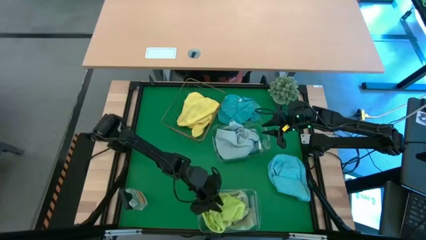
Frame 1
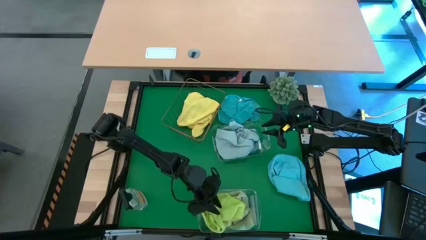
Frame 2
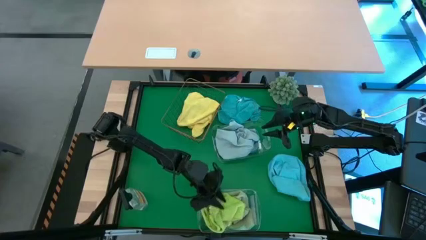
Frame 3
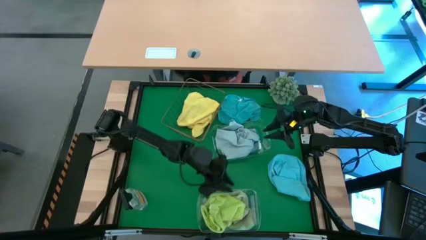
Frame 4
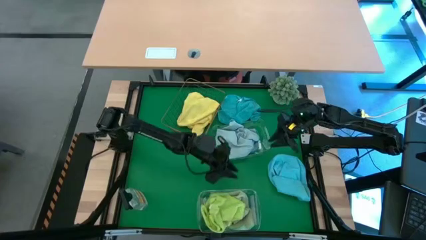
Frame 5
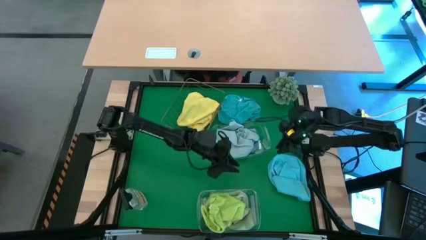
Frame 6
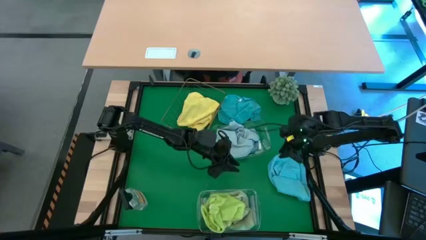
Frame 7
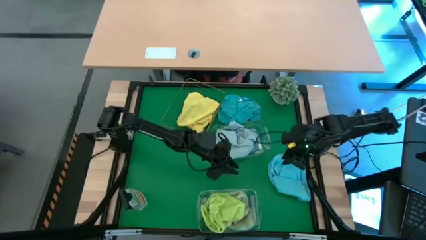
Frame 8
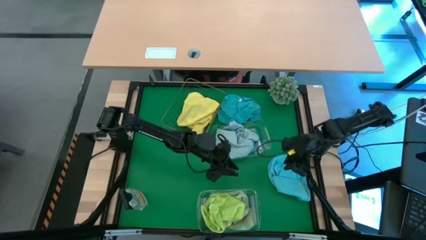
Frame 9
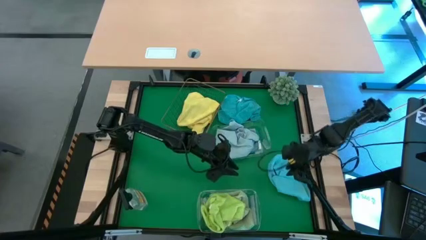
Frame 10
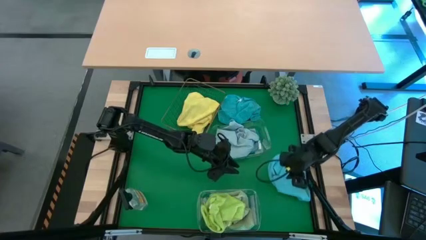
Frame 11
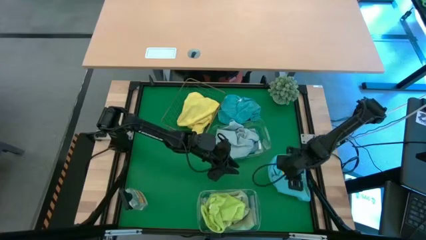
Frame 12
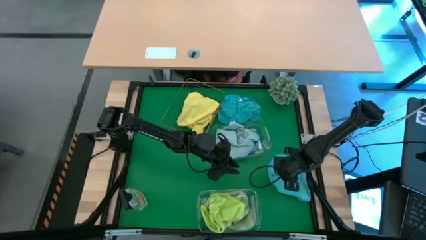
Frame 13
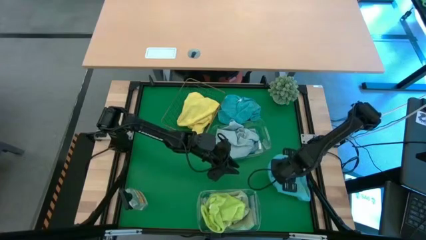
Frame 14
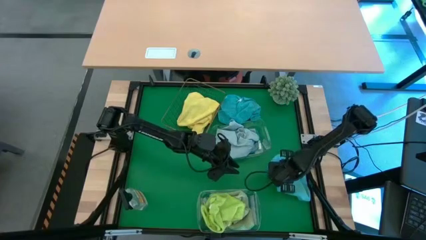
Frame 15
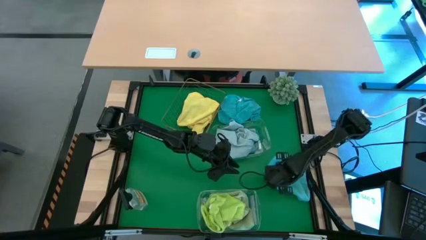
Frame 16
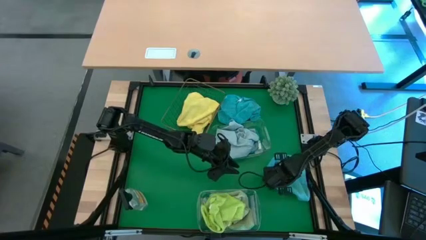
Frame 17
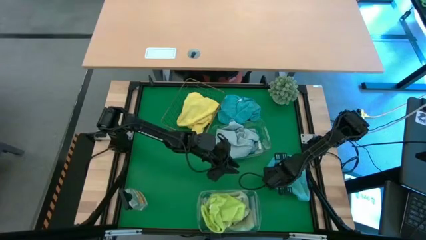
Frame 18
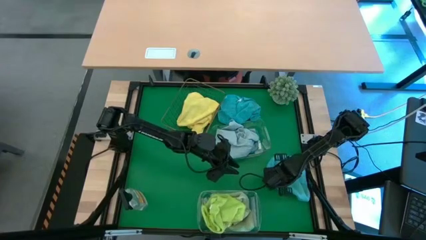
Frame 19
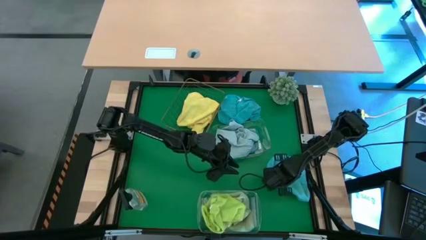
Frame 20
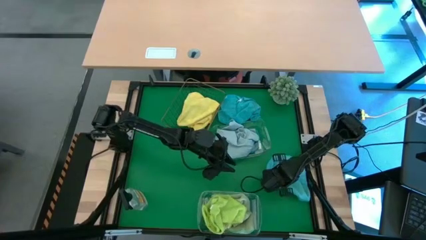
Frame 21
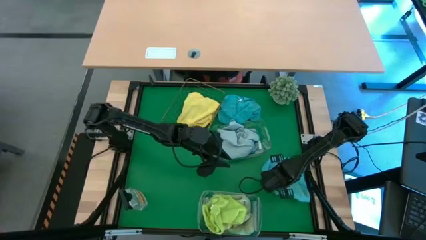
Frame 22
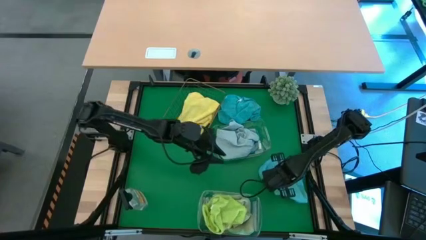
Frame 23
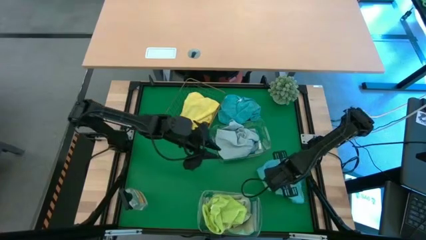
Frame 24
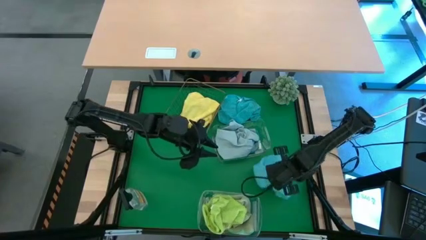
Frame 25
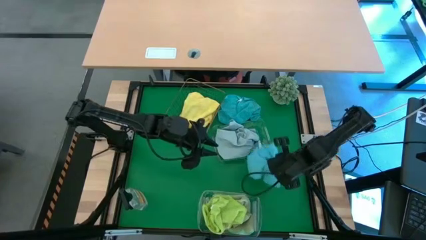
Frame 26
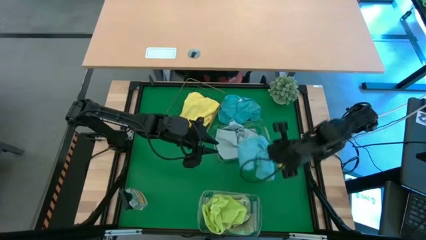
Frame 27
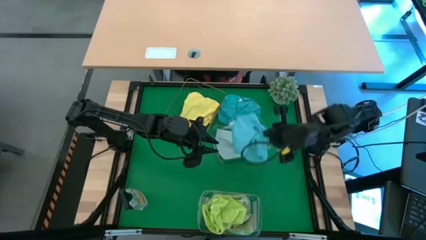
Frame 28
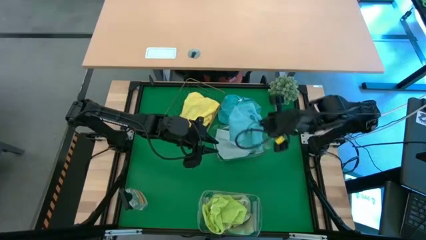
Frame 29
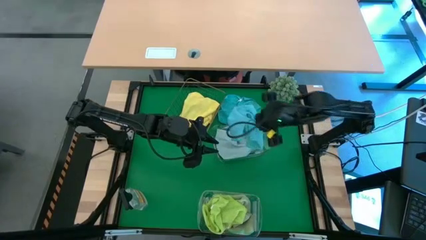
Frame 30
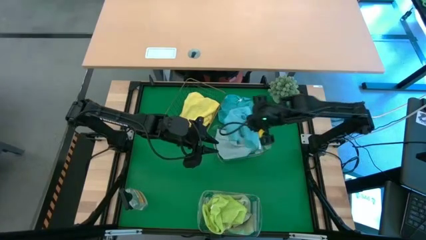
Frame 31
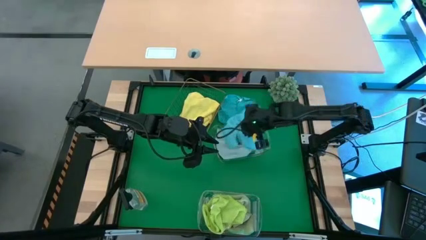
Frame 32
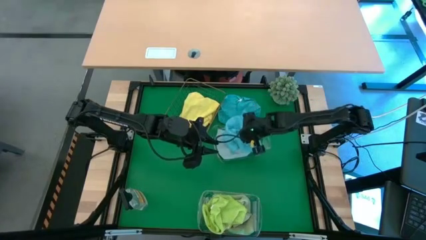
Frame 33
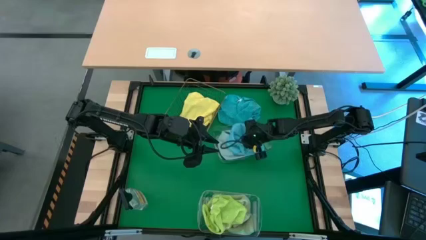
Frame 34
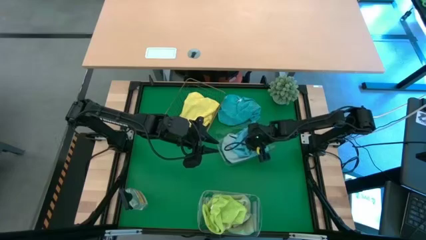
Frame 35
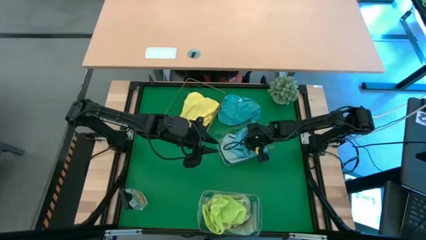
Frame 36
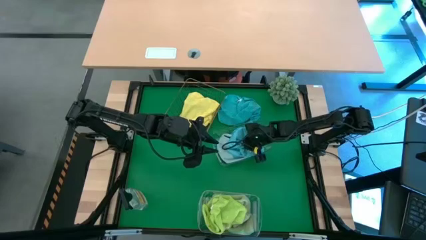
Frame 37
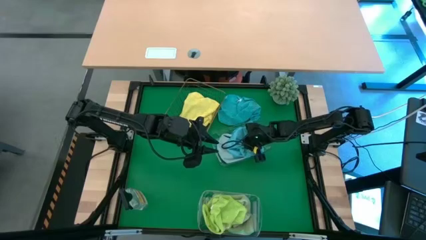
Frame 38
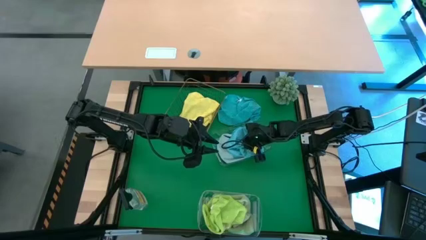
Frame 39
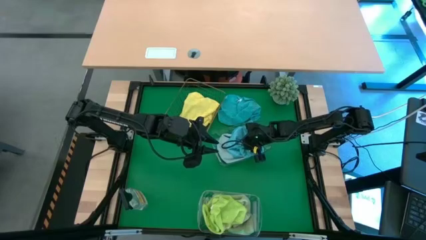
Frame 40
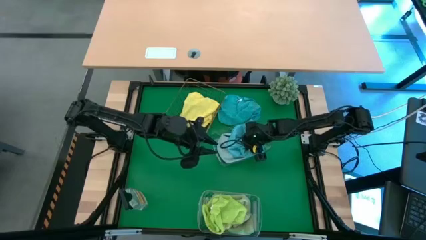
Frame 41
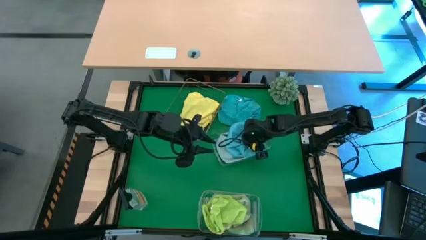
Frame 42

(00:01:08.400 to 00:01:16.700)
Task: Sort microfiber towel by color & place in baskets
Put the bottom blue towel into the top transparent bin

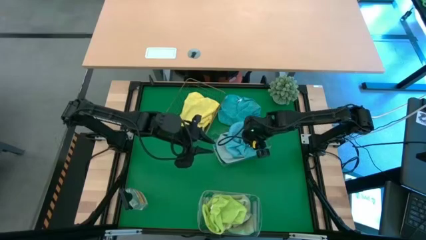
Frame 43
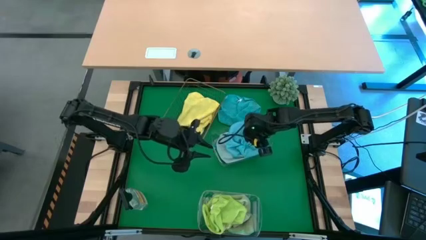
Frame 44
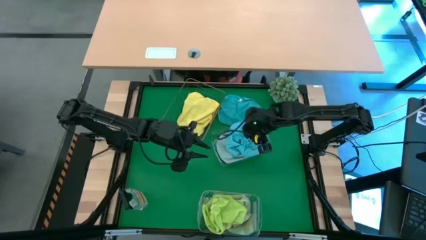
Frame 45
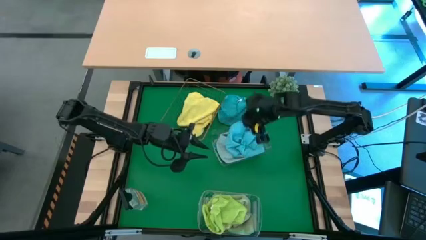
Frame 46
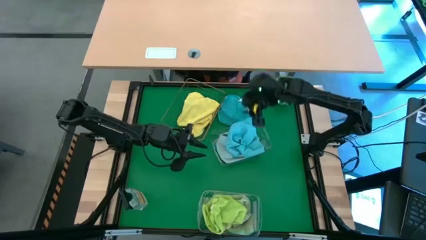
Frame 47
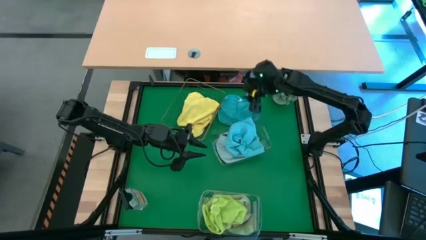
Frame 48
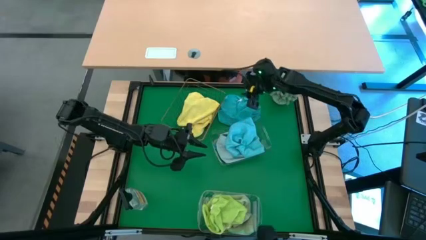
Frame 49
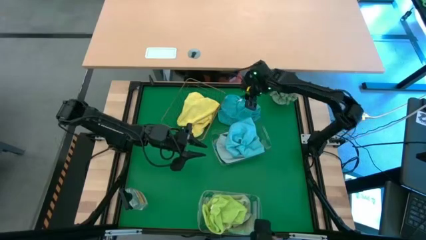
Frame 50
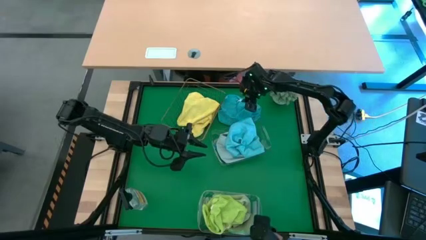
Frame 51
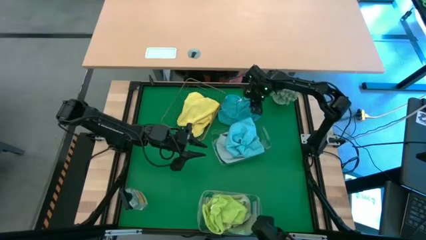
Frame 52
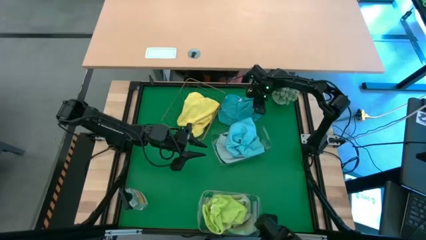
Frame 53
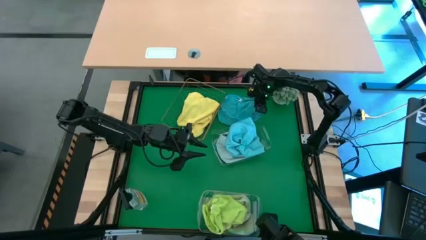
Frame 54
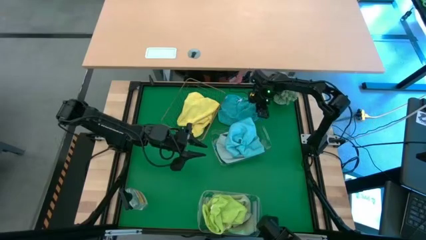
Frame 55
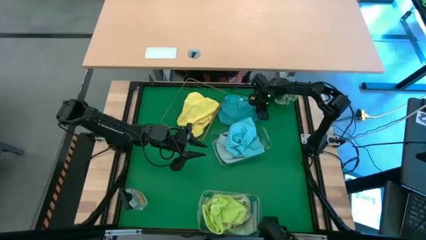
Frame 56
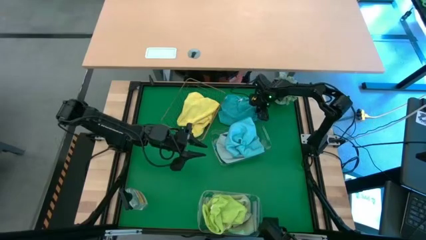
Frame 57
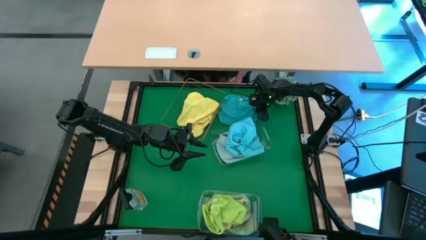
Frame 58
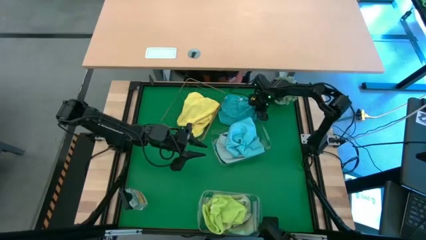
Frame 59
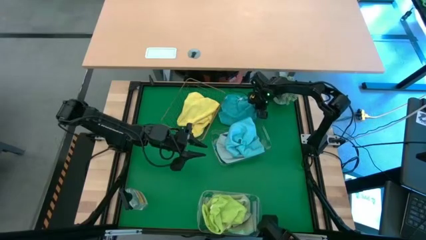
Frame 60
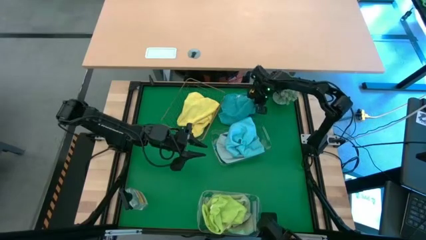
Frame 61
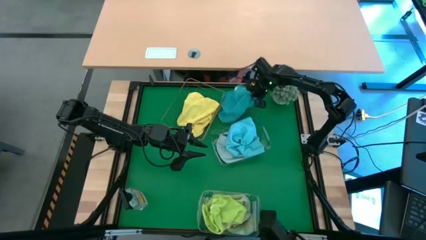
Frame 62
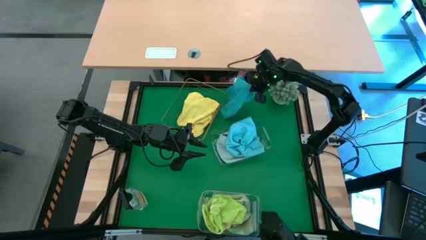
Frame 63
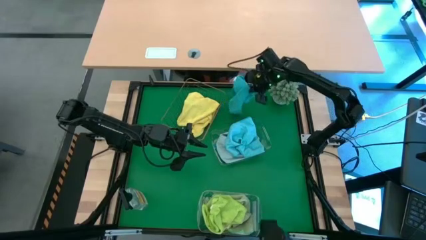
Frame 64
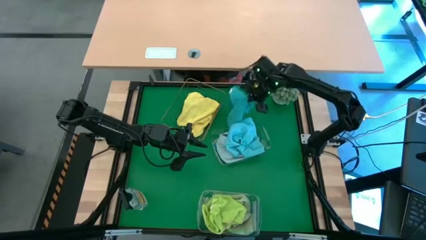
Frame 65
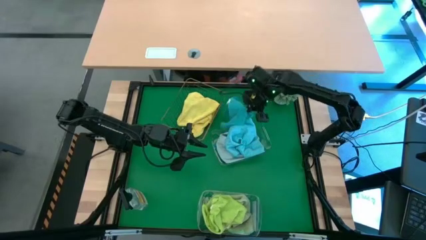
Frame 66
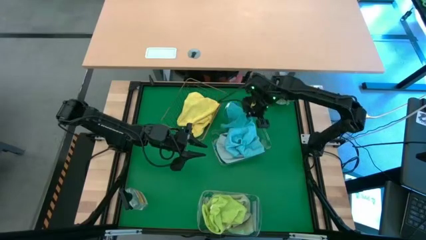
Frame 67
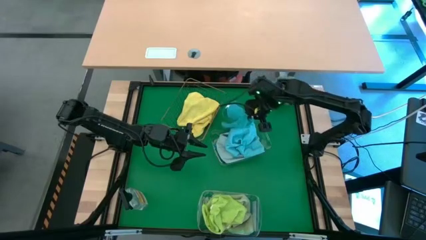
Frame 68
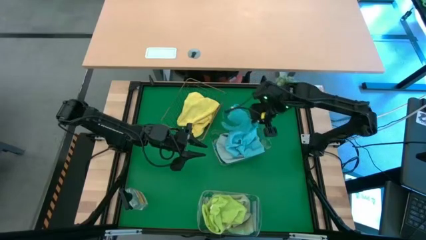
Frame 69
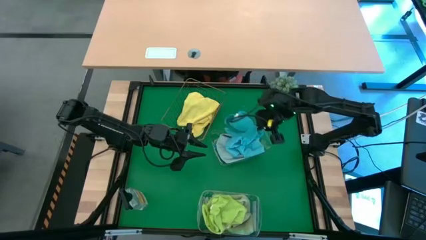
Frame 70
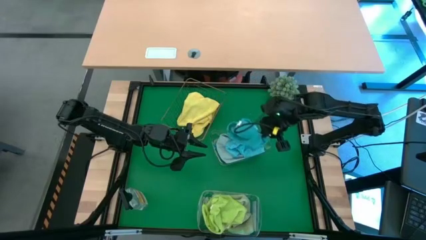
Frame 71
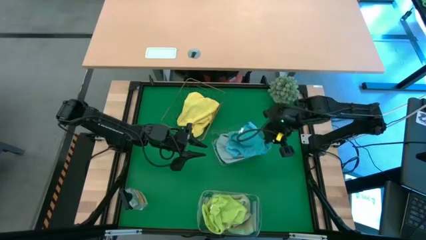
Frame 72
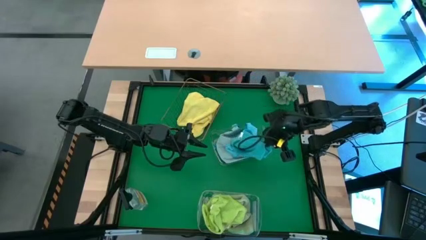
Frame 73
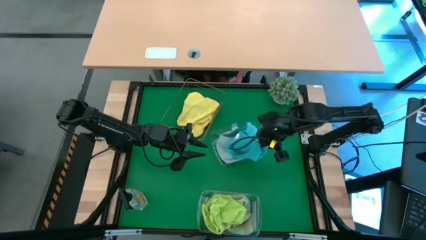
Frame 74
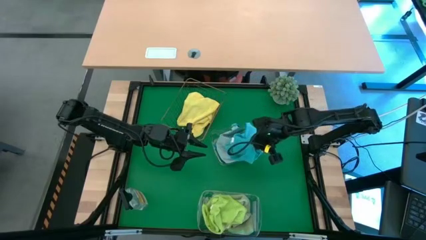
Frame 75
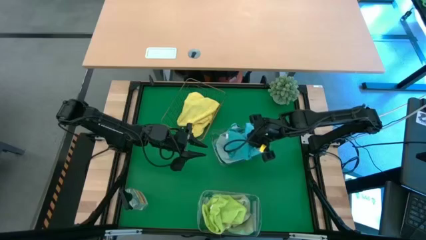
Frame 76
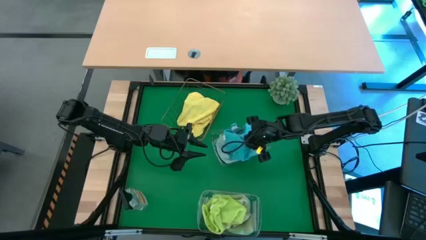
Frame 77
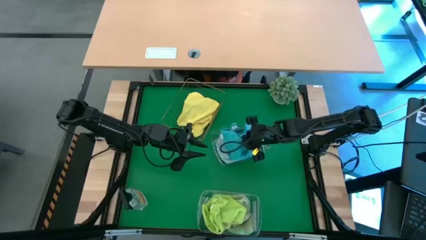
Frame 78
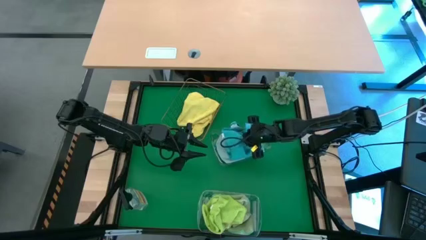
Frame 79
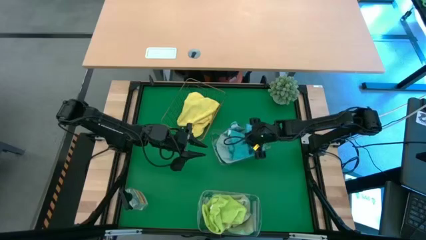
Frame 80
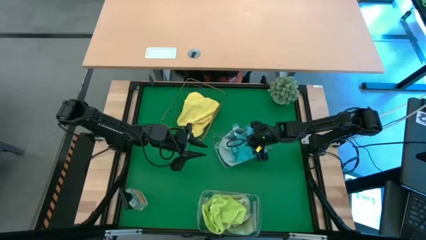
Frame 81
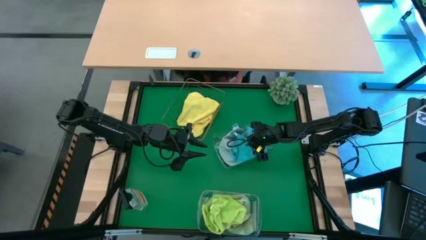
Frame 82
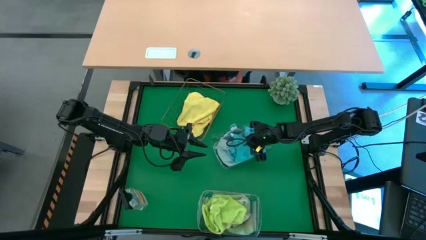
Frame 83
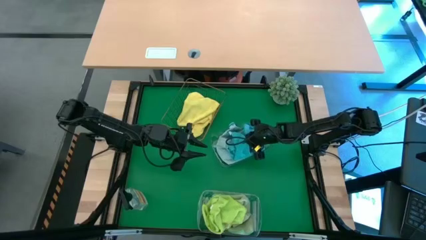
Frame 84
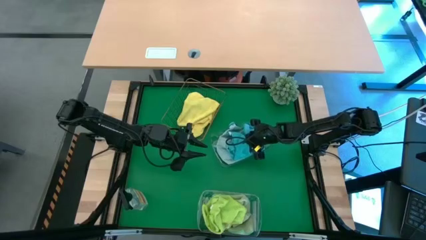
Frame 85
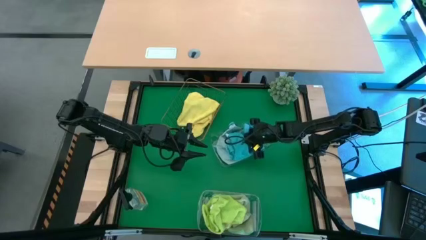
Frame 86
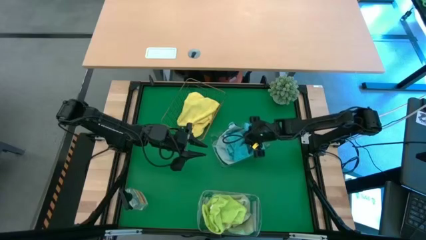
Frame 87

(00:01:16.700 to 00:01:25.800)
Put the blue towel into the top transparent bin
